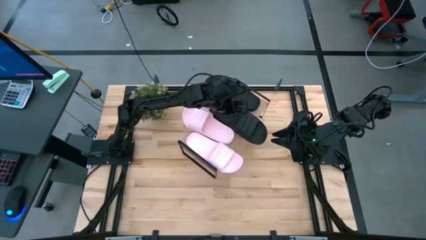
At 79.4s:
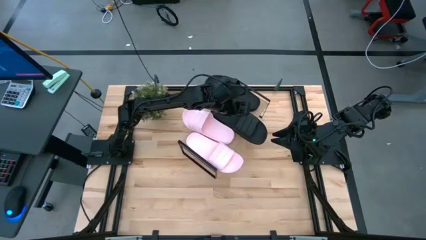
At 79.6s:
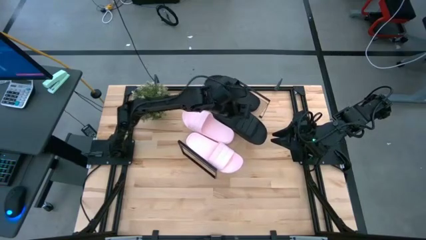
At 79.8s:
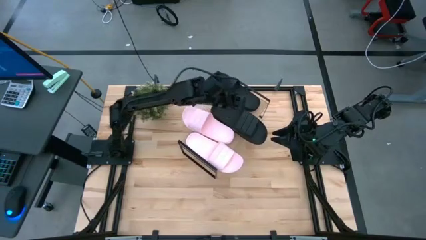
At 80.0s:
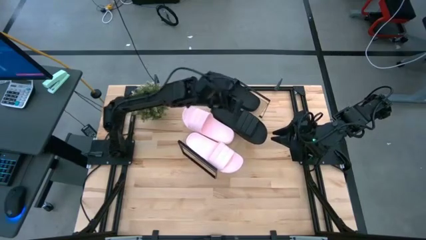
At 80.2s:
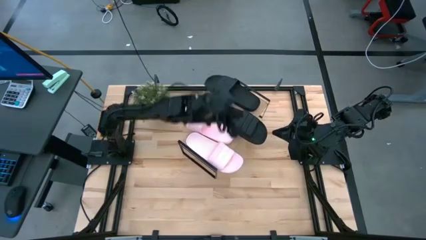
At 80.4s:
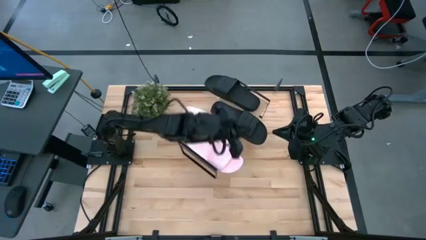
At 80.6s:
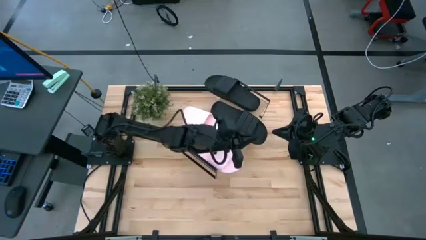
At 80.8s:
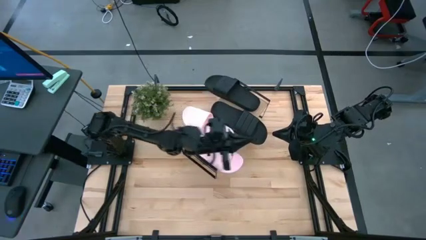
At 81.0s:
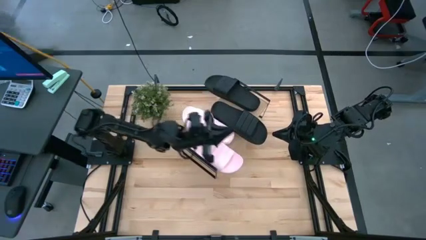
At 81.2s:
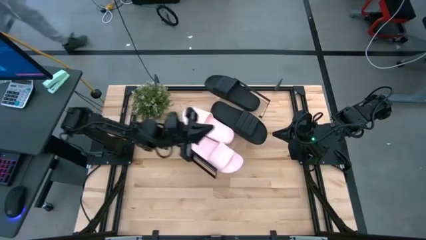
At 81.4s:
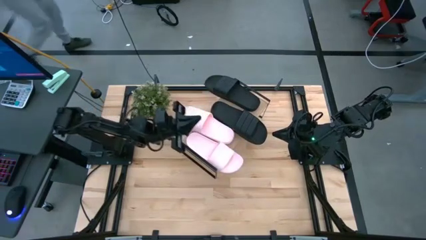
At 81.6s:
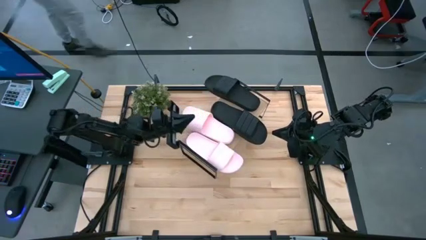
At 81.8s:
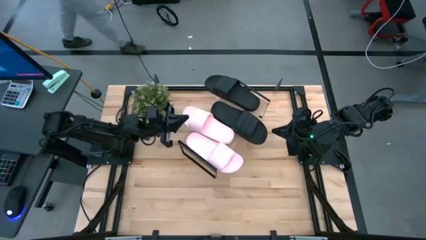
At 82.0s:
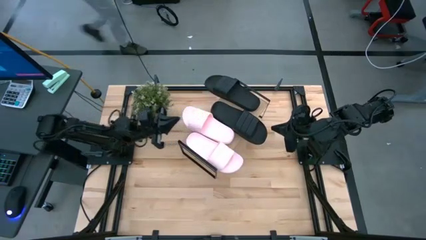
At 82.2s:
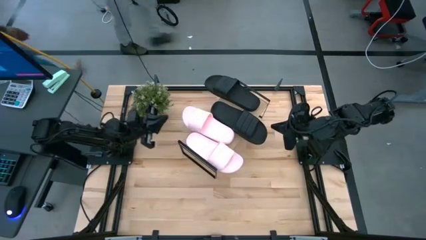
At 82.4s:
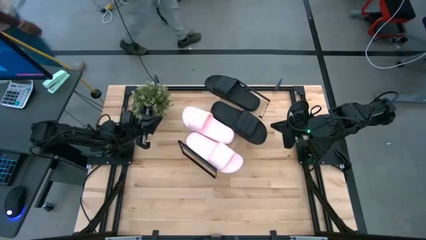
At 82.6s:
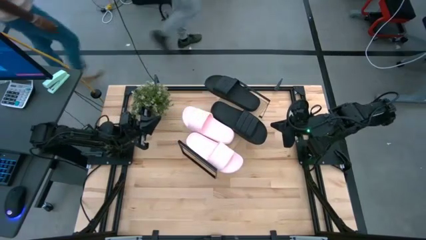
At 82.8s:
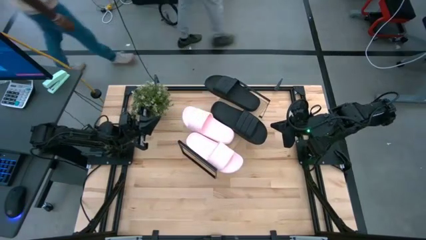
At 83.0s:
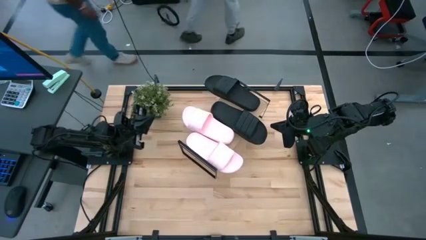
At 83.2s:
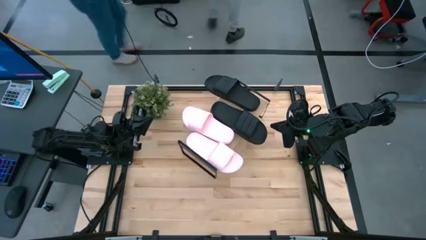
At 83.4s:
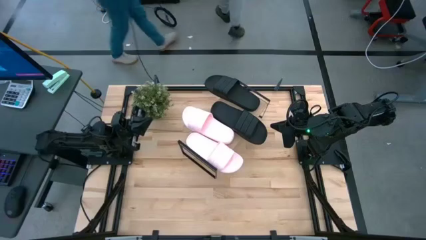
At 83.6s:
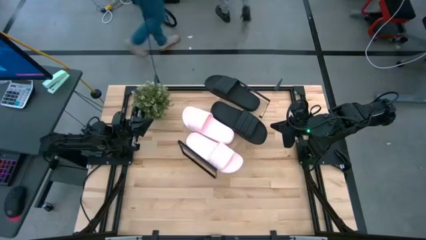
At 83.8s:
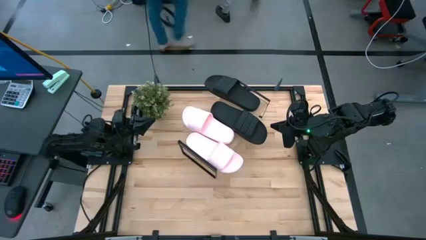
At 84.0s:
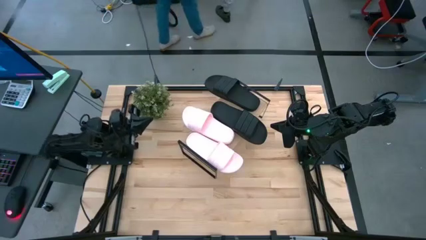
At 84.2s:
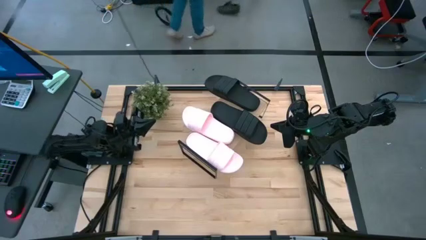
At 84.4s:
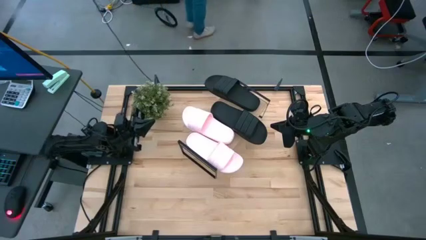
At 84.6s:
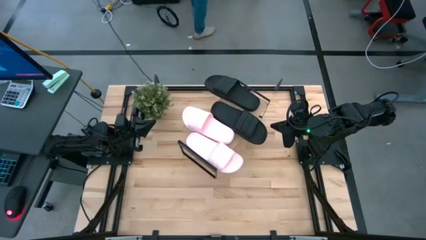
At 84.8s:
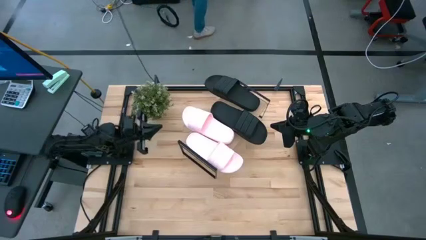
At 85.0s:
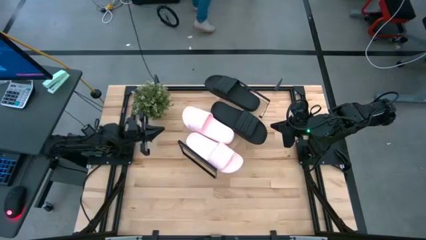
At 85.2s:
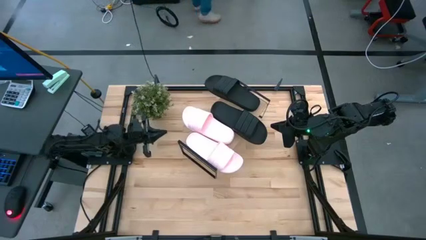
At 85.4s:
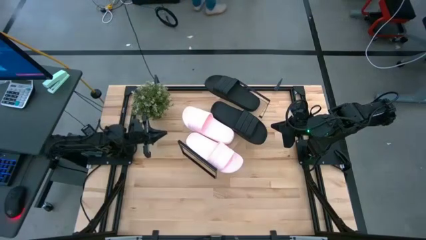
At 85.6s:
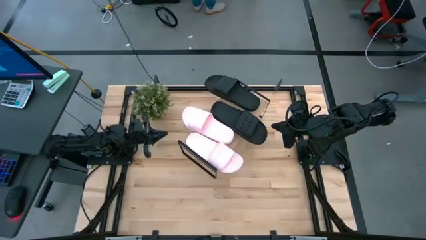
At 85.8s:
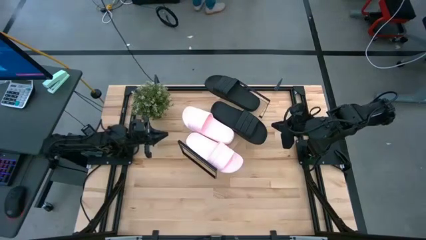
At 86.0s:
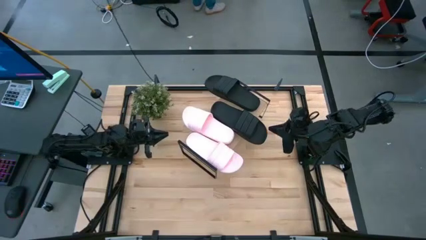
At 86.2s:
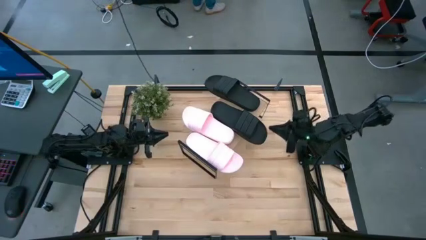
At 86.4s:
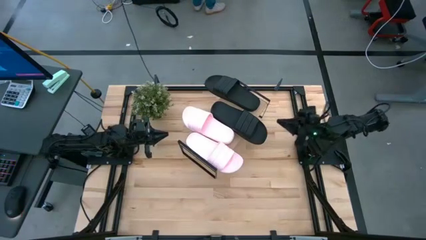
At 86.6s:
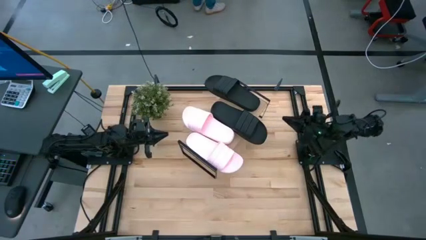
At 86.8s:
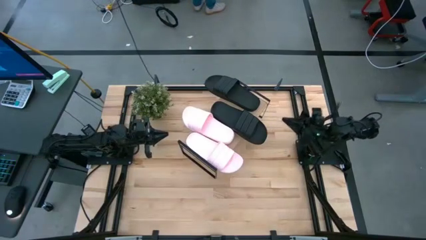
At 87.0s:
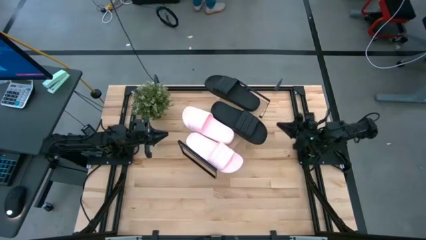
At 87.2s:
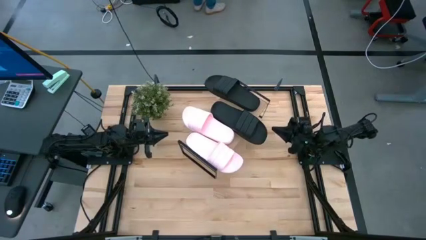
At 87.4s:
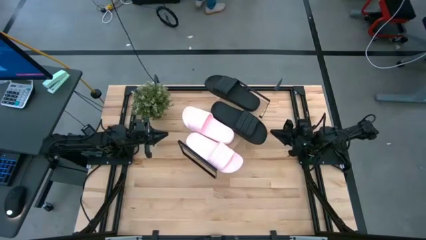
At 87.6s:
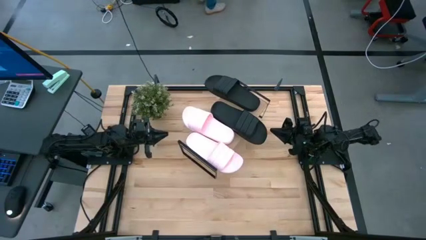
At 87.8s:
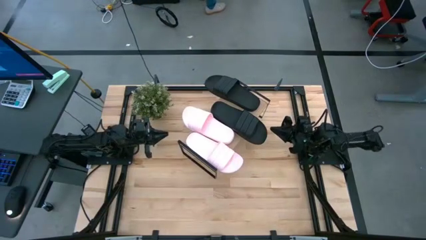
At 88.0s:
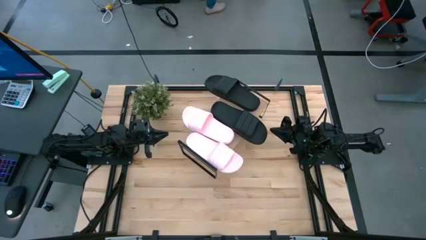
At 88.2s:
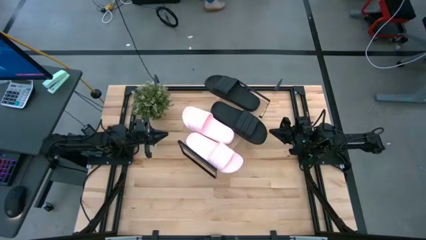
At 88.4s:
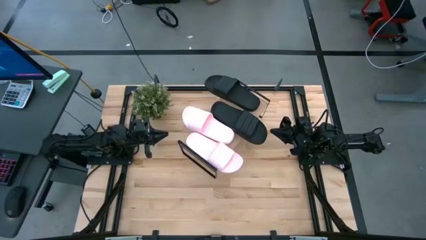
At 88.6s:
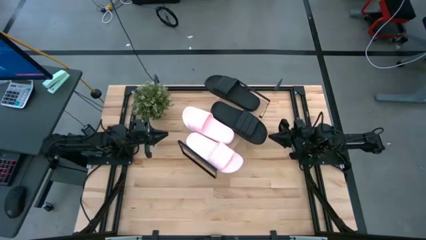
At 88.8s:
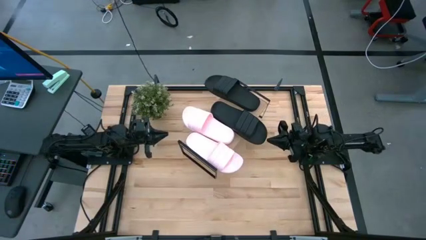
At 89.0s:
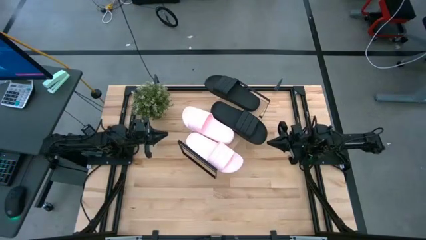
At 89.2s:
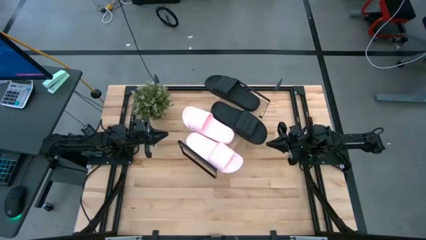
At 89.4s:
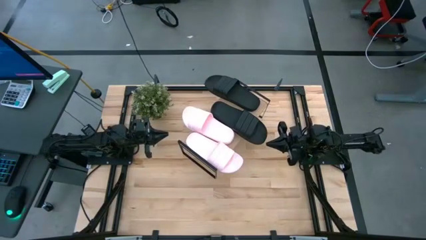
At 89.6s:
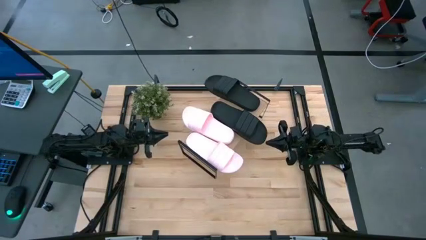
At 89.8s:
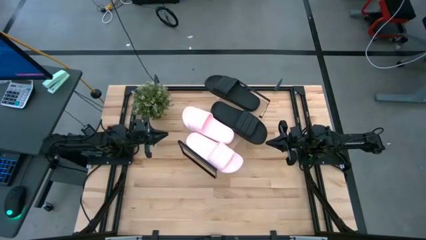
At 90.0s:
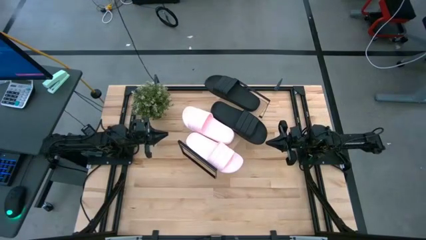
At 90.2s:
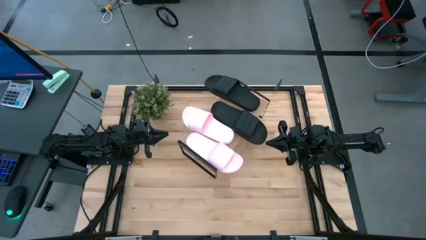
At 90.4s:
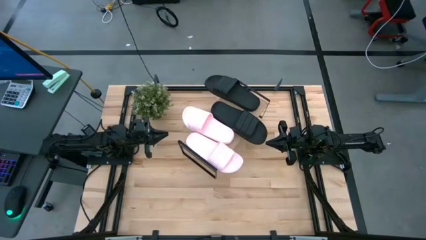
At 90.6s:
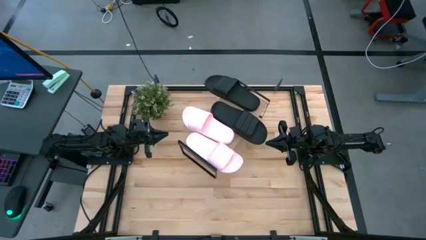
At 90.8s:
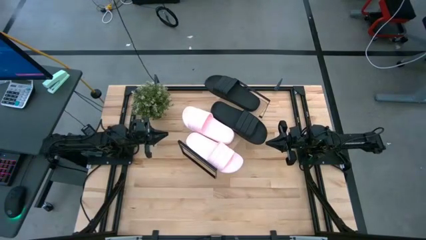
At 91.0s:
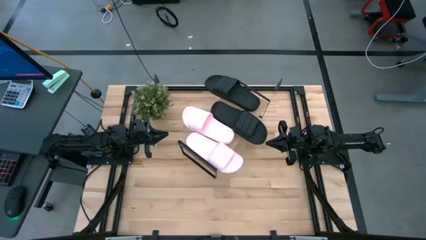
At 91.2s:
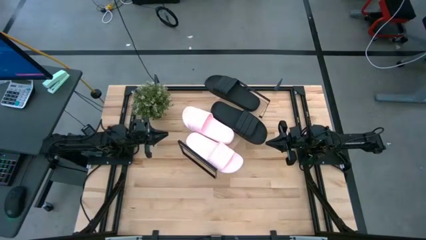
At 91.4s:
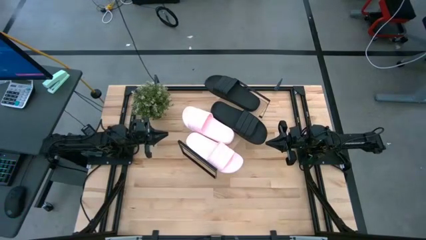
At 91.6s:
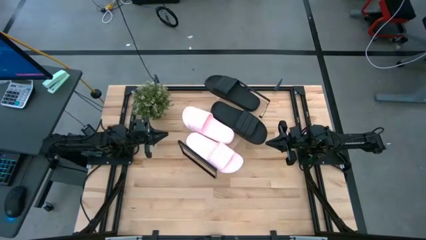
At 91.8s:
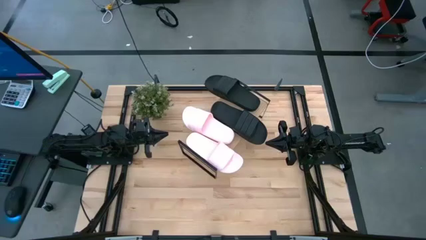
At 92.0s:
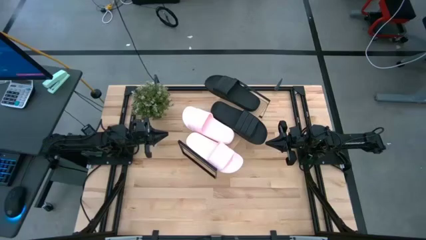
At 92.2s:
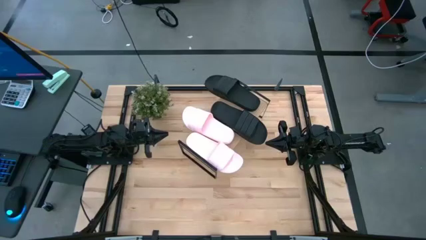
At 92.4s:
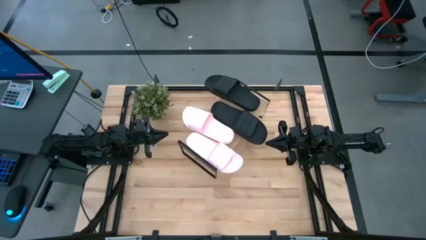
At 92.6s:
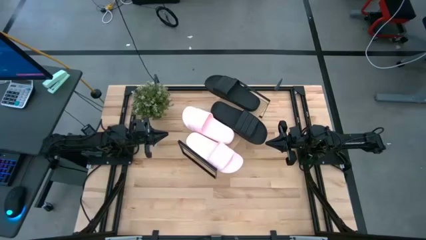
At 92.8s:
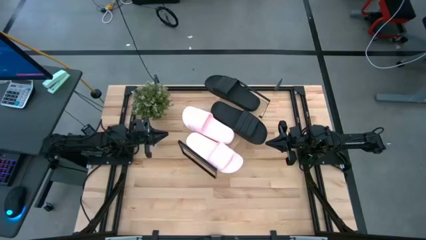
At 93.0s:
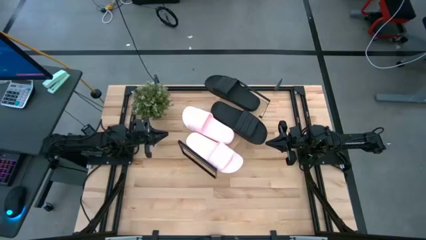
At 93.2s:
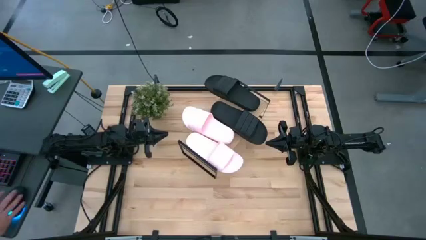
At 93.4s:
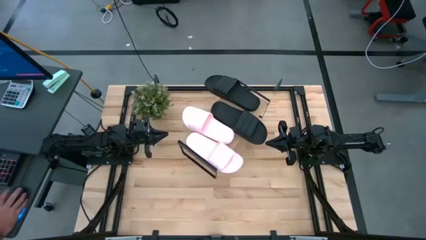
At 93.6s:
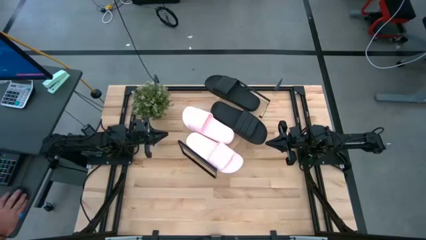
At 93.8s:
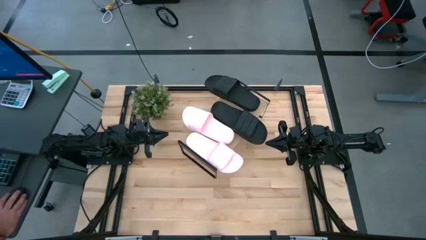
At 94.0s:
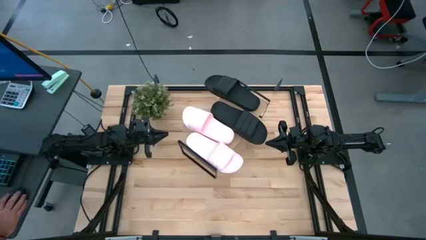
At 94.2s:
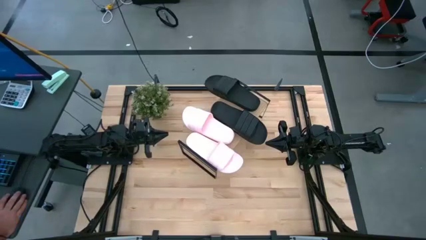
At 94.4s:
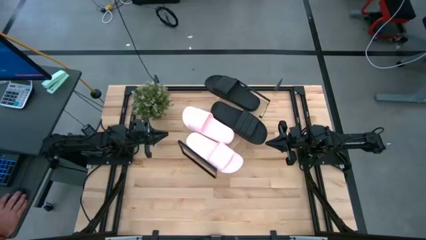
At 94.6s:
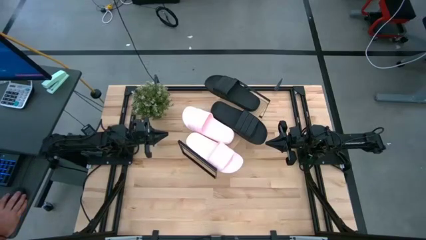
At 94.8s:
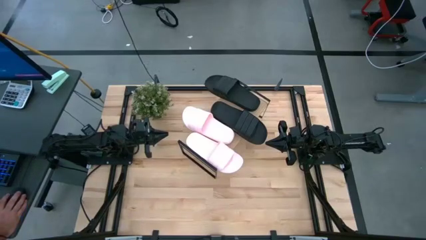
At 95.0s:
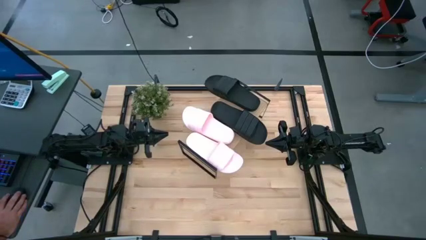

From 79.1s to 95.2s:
Task: Pick and place slides into the shelf
Return to Home Position
